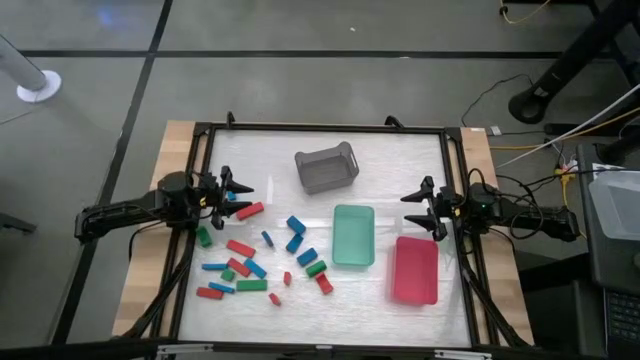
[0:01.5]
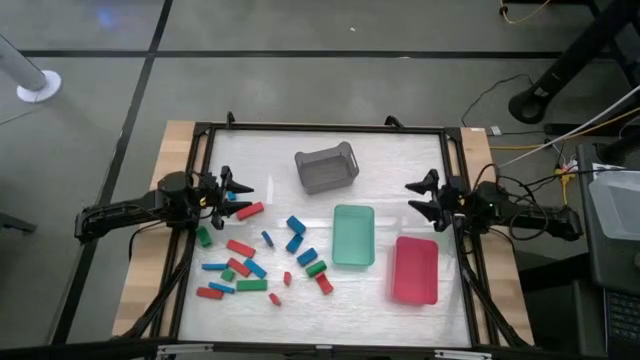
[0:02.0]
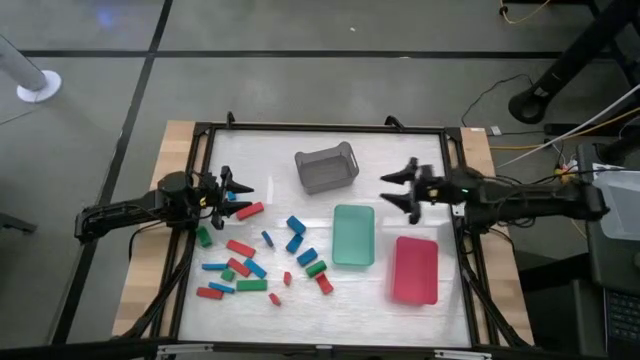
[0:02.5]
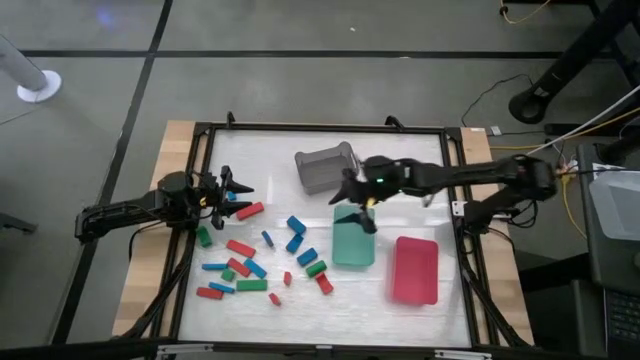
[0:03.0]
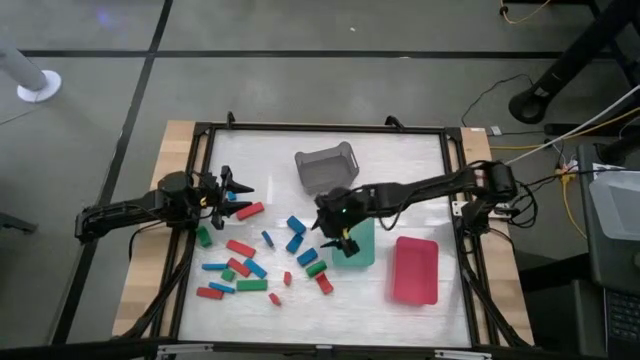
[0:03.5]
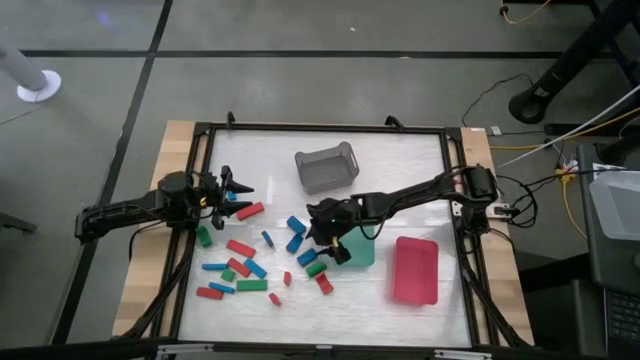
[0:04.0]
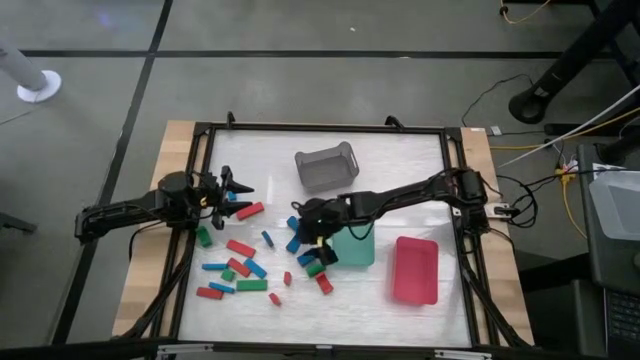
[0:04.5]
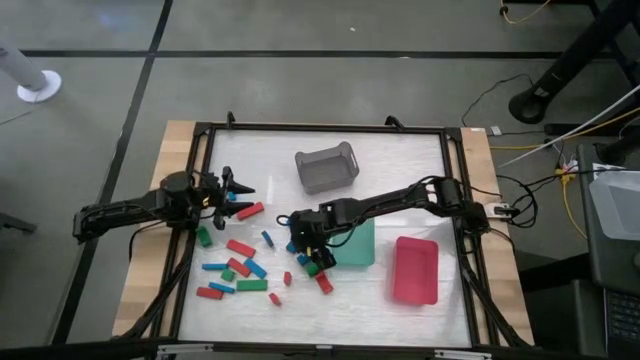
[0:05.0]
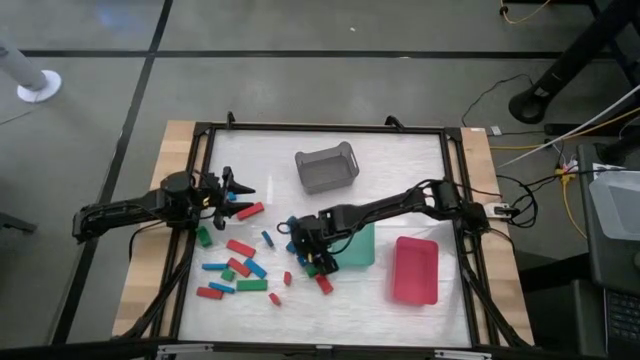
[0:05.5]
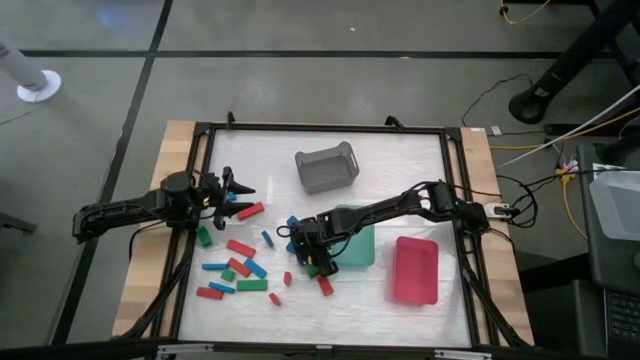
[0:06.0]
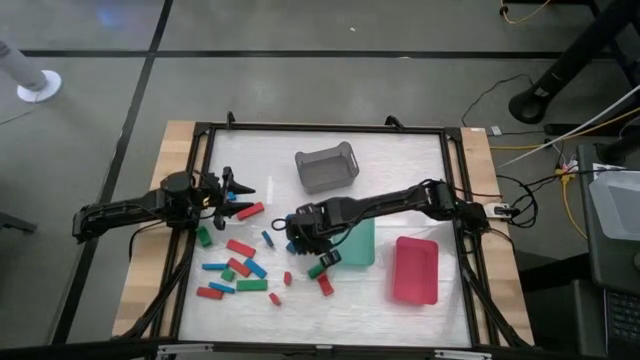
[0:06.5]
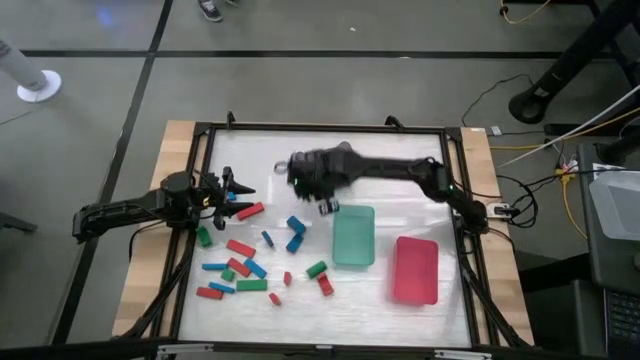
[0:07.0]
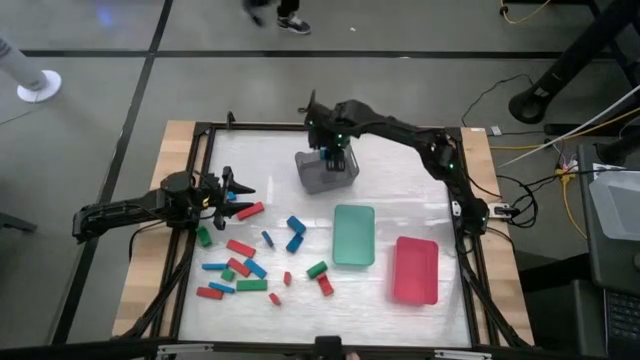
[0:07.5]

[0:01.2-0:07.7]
Task: Sort blocks
Put the blue block into the gray bin

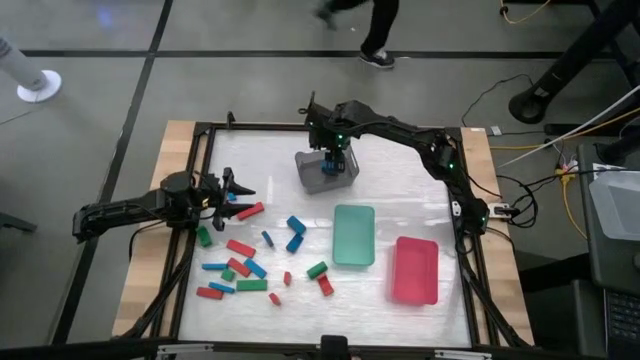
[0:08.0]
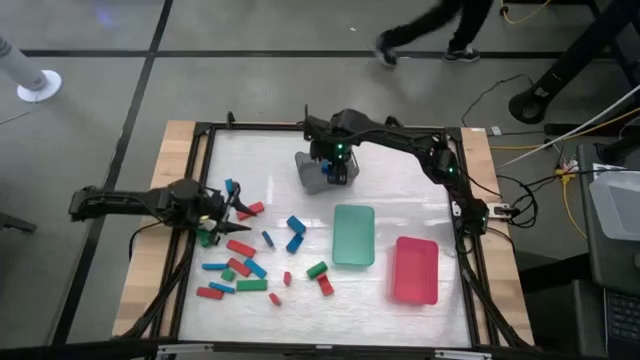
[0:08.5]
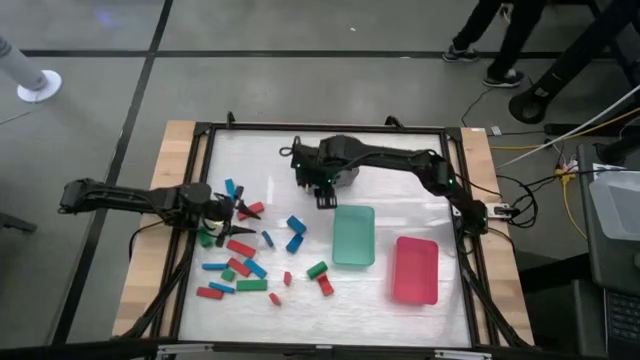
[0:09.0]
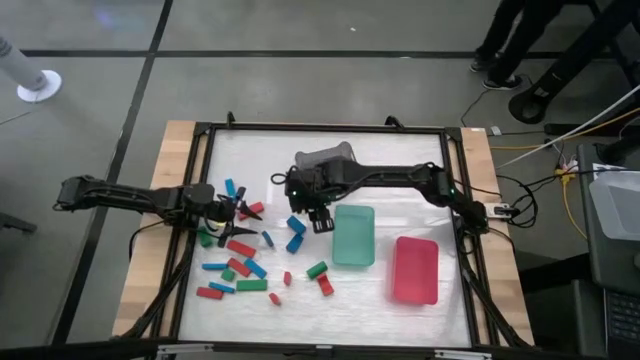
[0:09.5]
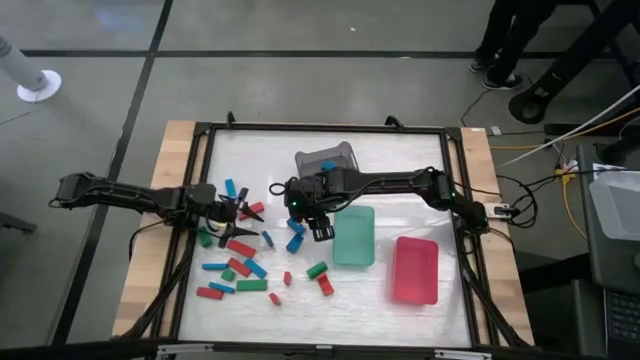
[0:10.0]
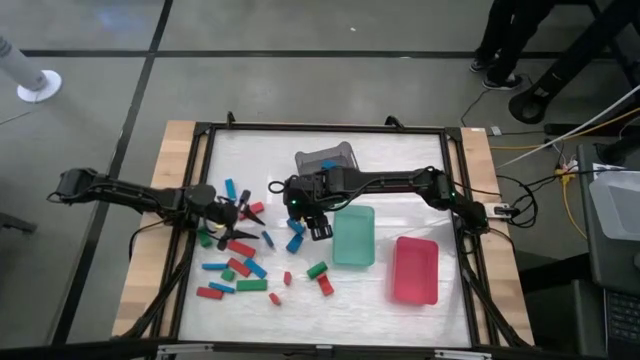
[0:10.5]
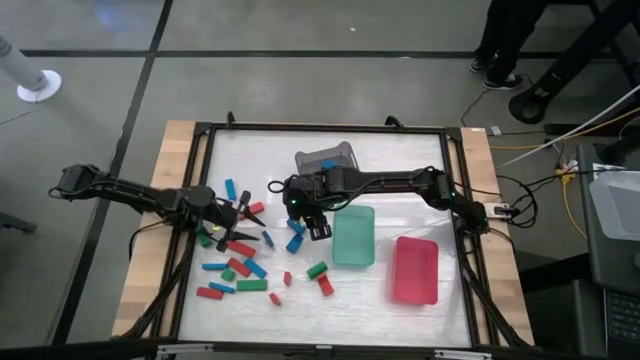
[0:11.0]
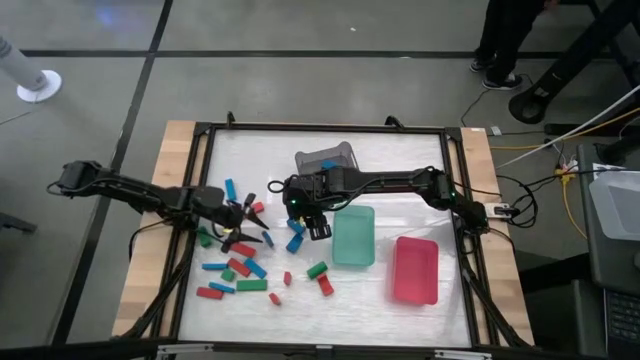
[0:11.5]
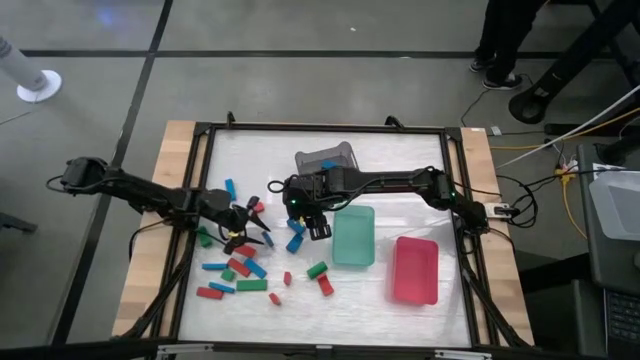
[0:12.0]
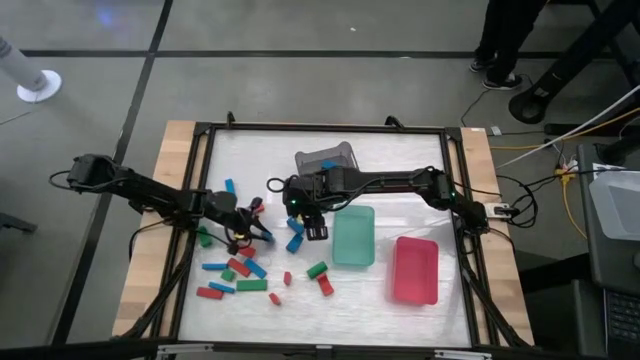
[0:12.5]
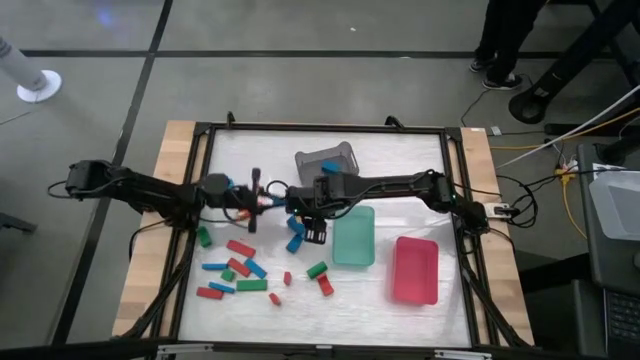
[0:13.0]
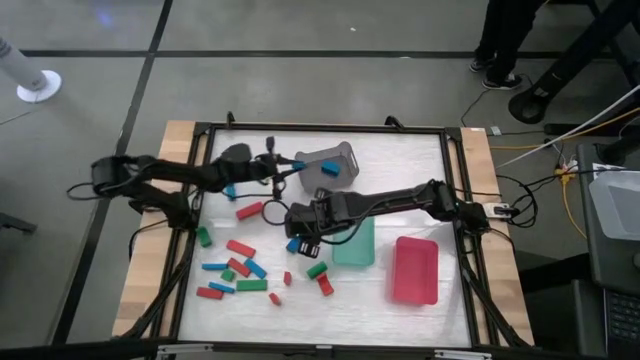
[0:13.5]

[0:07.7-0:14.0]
Put the blue block into the gray bin

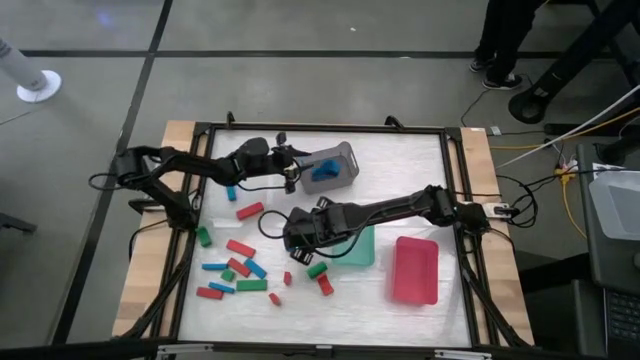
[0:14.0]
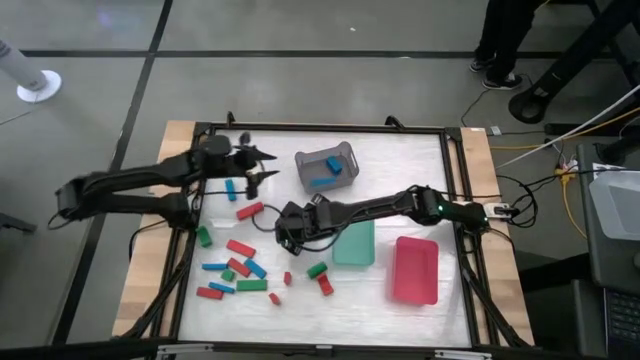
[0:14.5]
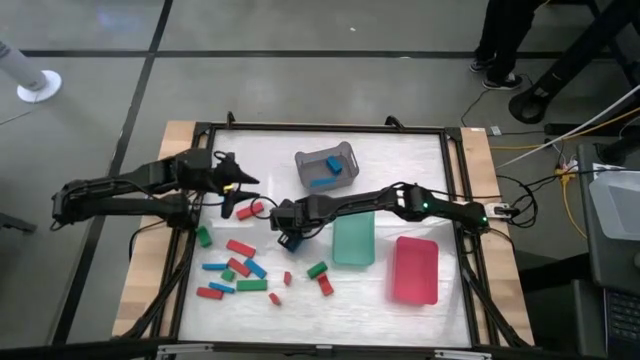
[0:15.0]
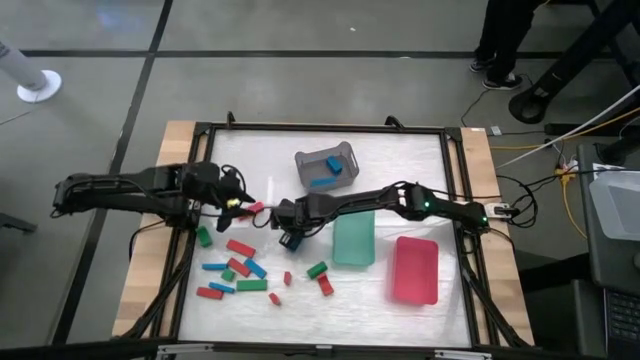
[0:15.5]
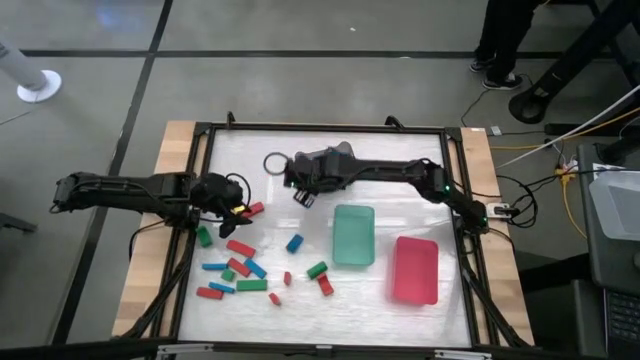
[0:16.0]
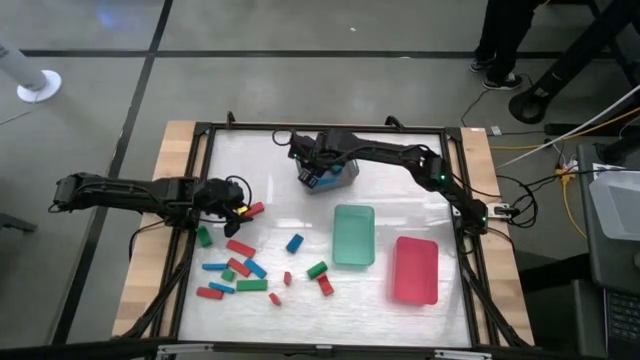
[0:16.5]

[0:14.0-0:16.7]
Put the blue triangular block into the gray bin

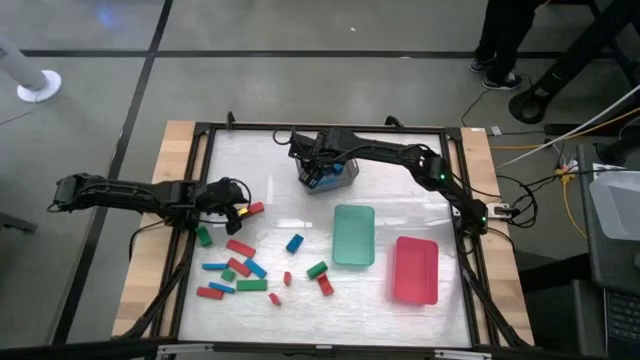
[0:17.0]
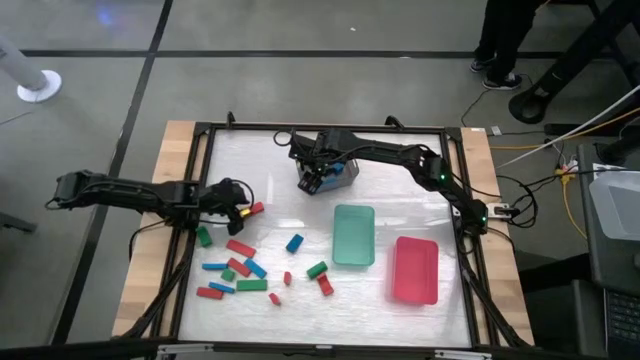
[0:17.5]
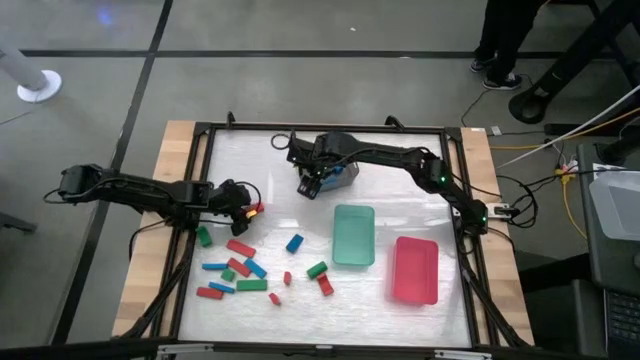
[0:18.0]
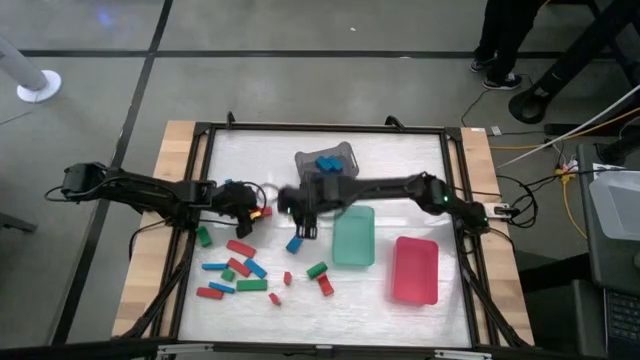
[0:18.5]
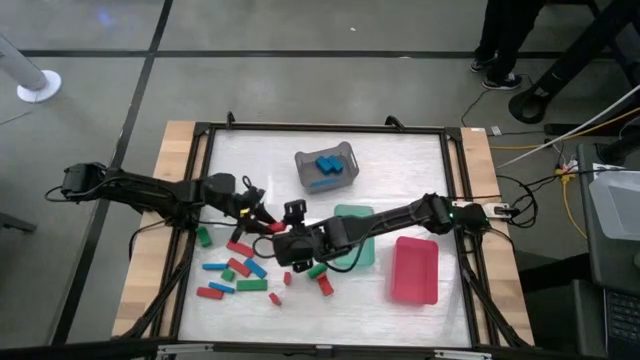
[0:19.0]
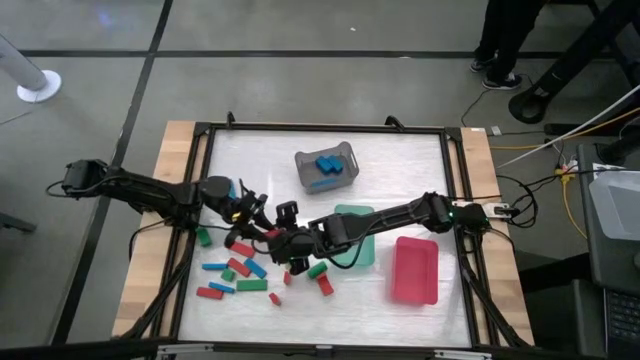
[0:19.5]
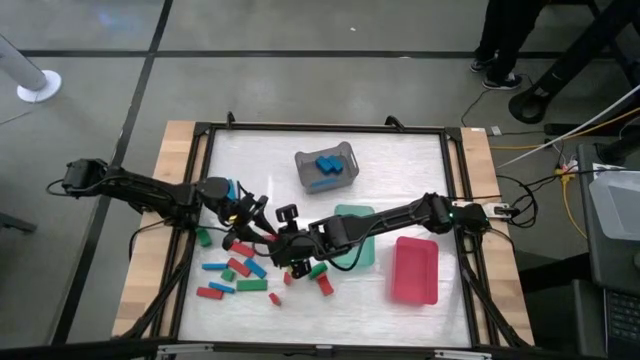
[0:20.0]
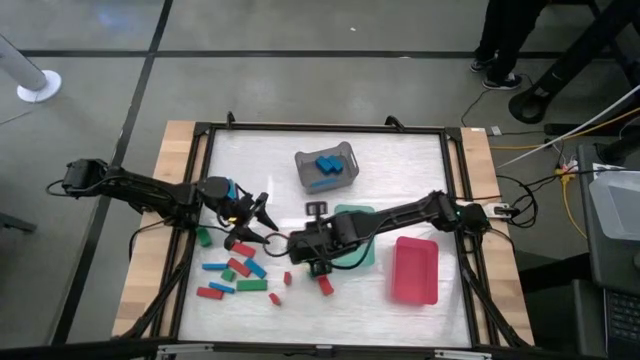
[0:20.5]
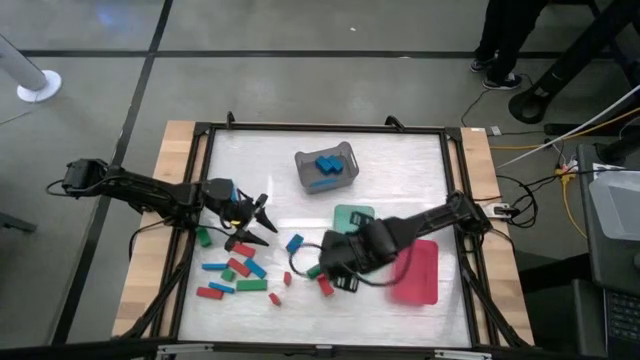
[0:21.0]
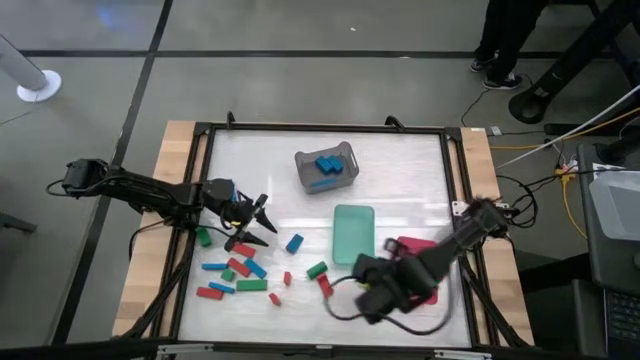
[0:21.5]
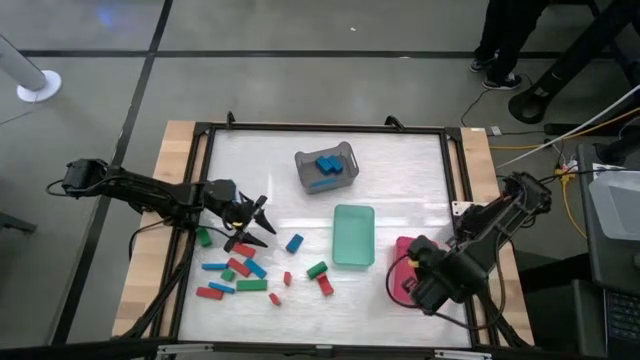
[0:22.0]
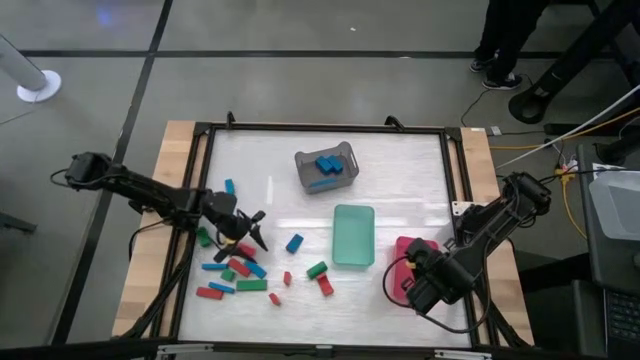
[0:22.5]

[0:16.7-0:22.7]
Put the red block into the pink bin
